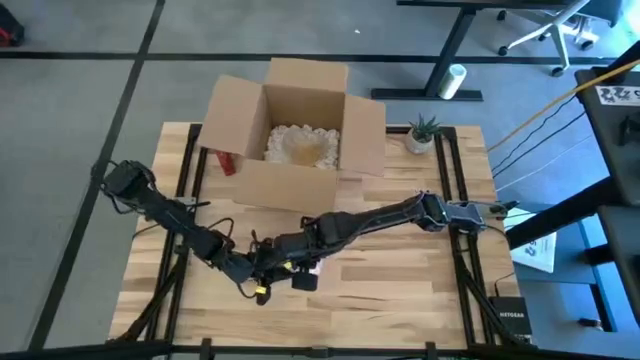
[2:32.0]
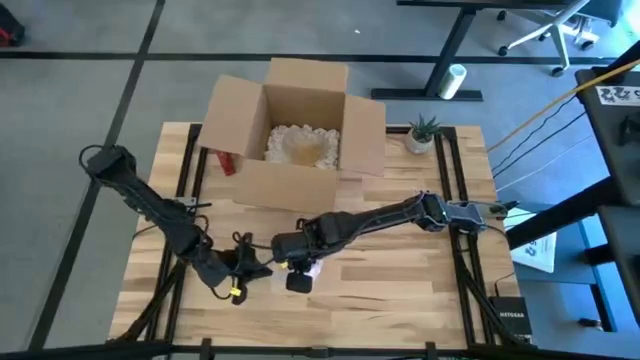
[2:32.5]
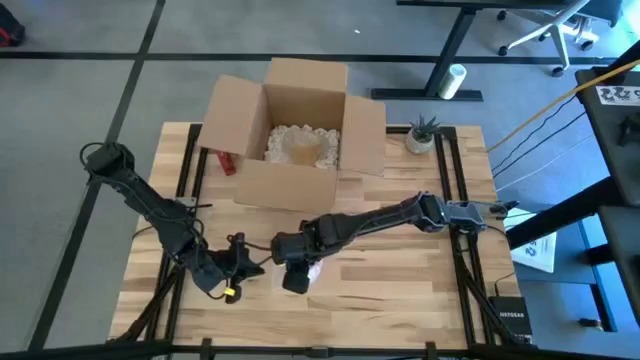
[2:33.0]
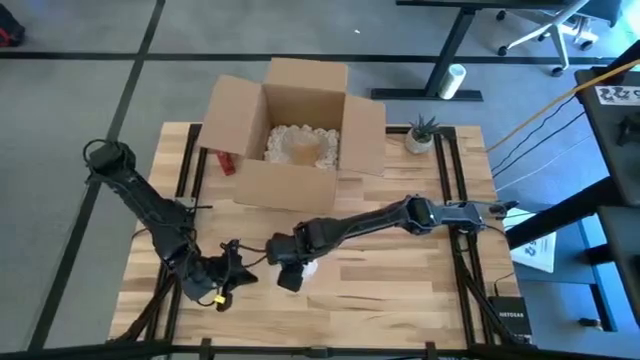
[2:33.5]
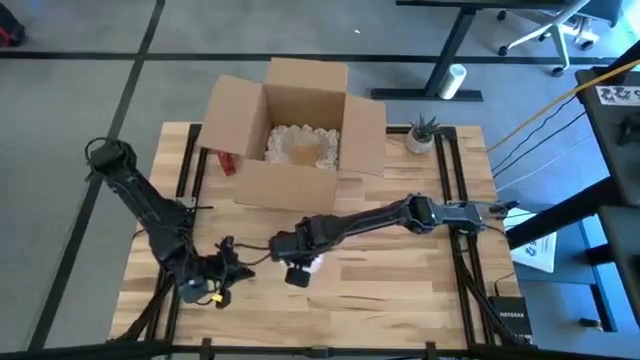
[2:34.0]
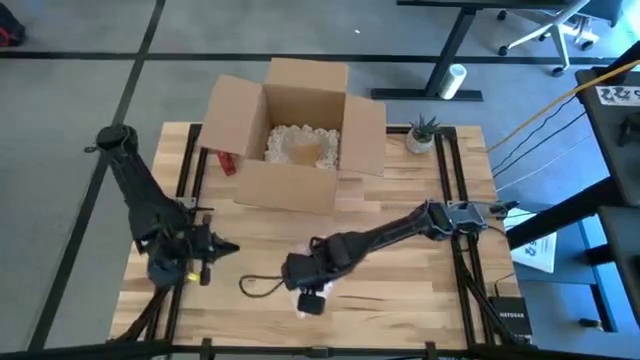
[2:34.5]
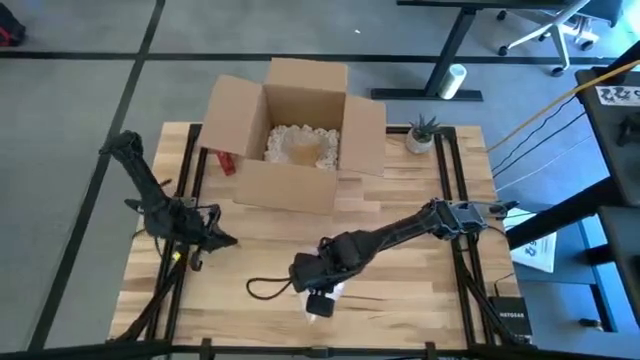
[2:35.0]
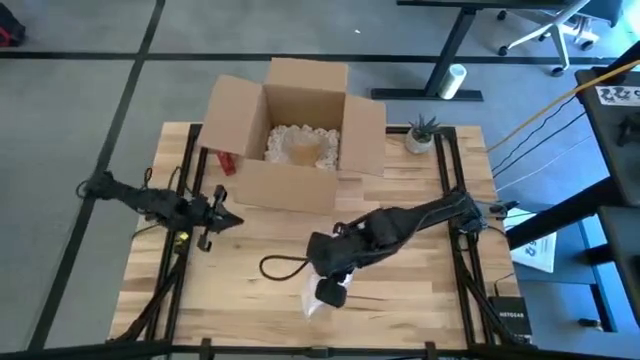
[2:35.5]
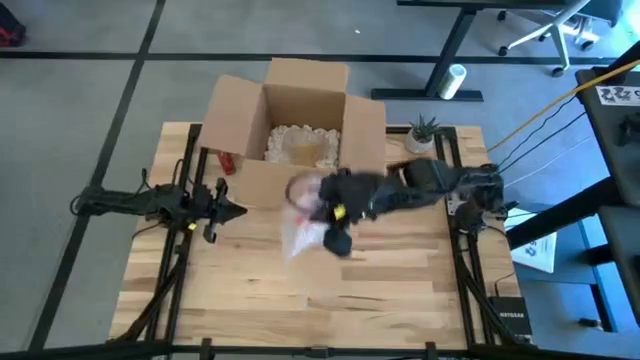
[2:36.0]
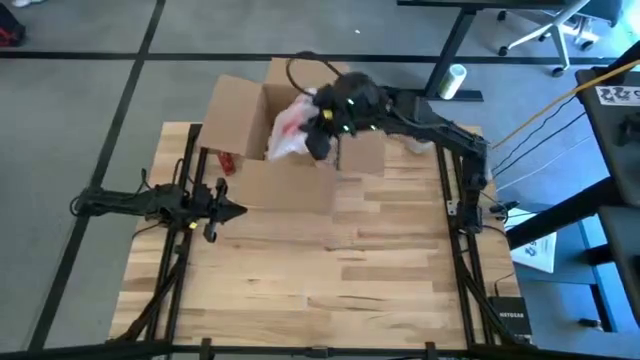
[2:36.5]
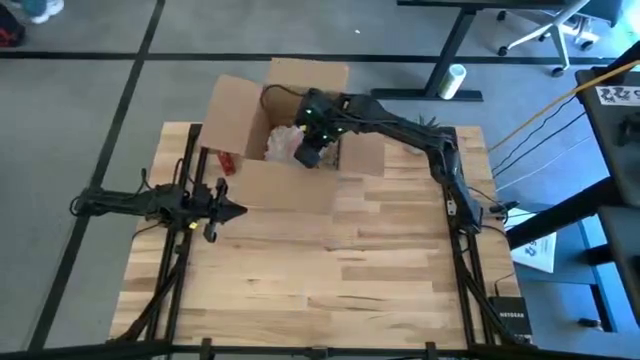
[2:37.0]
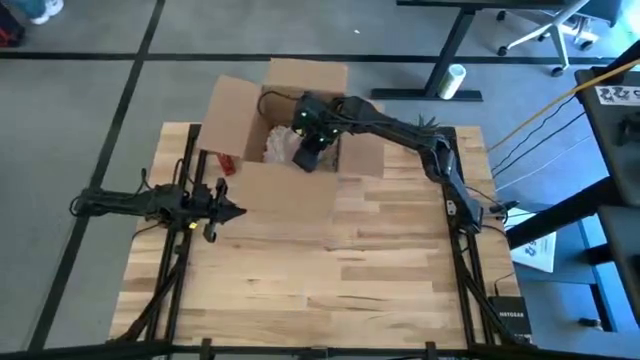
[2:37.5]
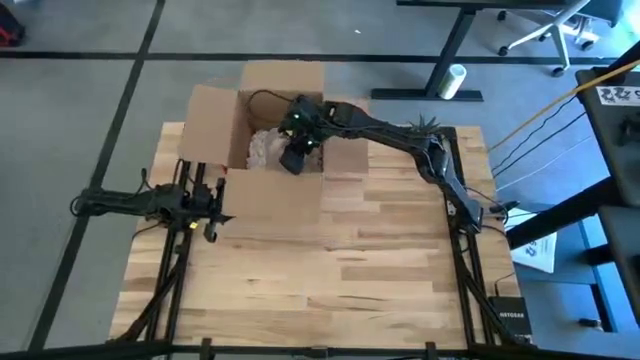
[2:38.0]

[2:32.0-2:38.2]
Task: wrap mug
Put the wrapped red mug into the cardboard box

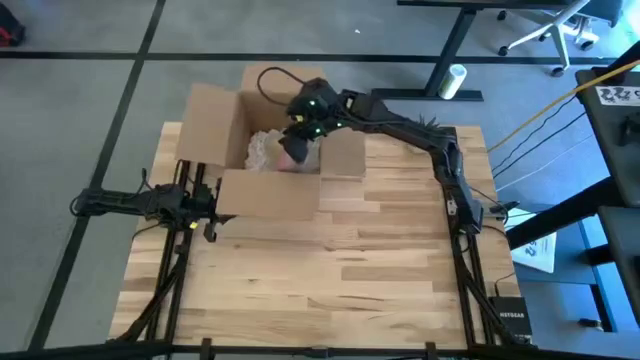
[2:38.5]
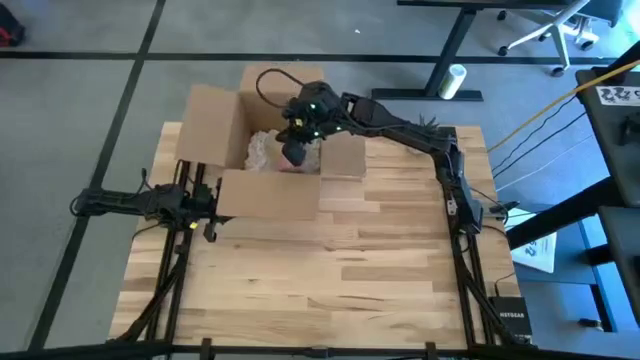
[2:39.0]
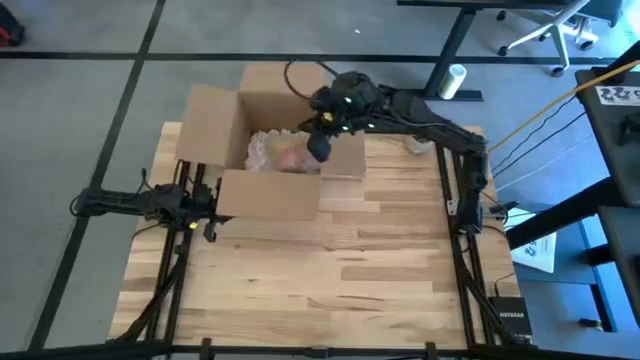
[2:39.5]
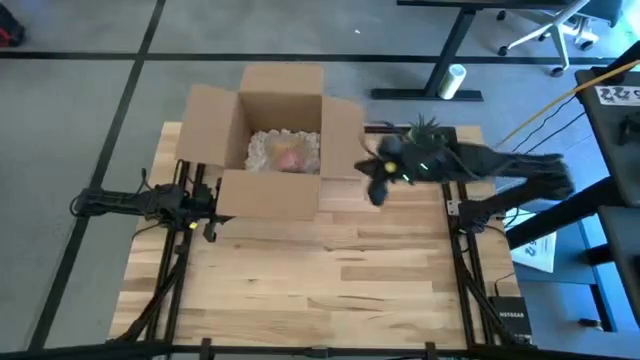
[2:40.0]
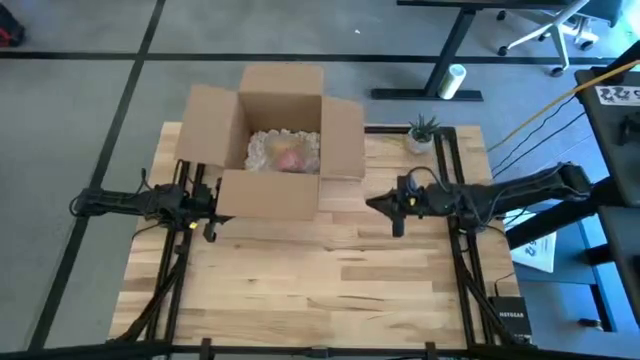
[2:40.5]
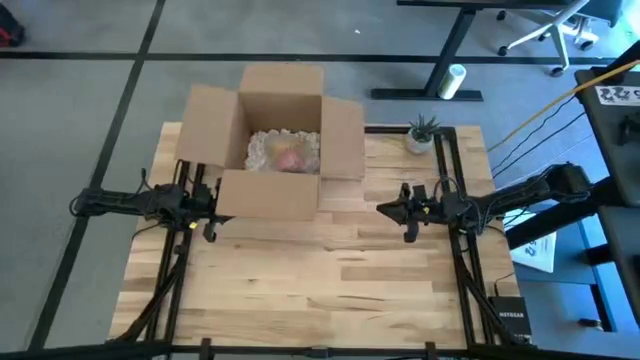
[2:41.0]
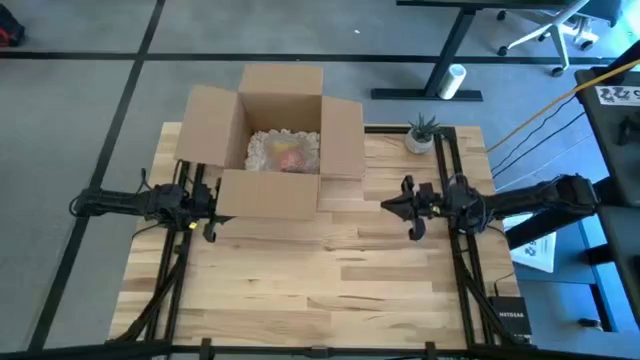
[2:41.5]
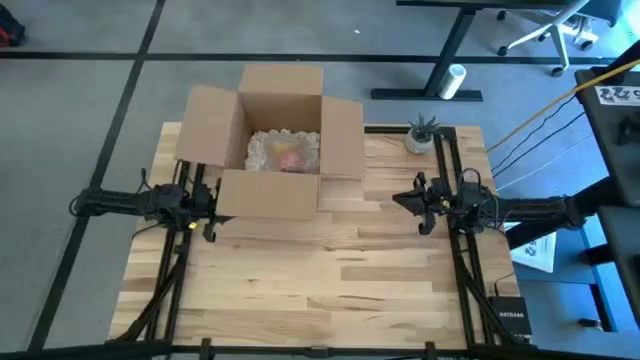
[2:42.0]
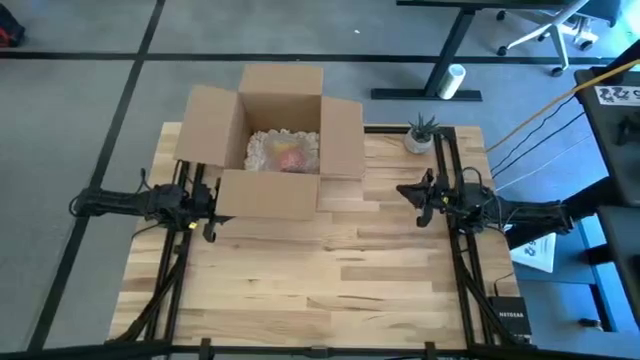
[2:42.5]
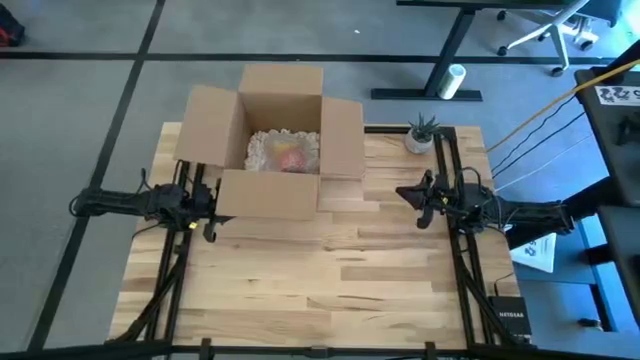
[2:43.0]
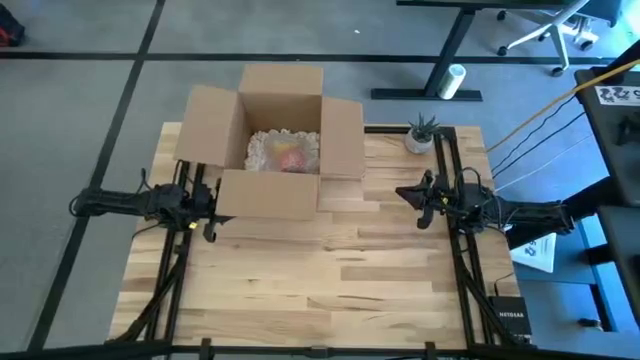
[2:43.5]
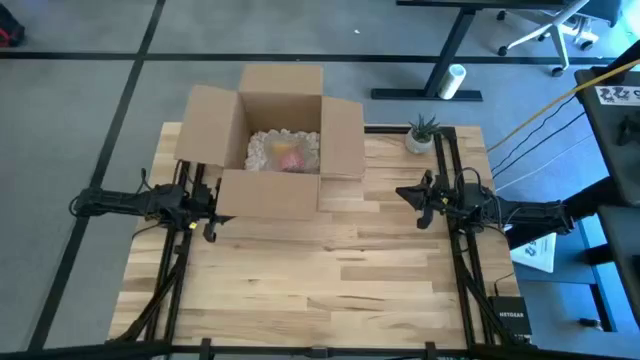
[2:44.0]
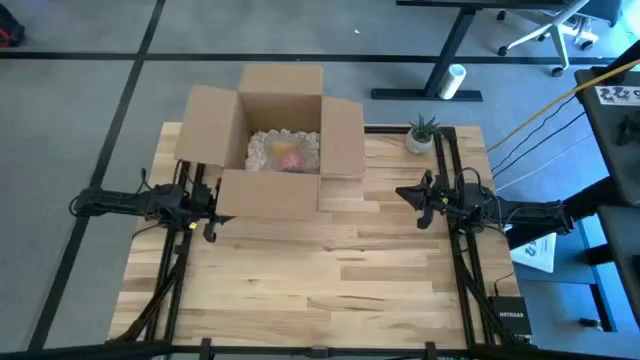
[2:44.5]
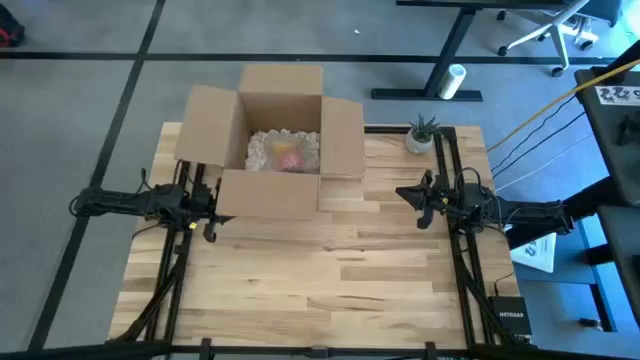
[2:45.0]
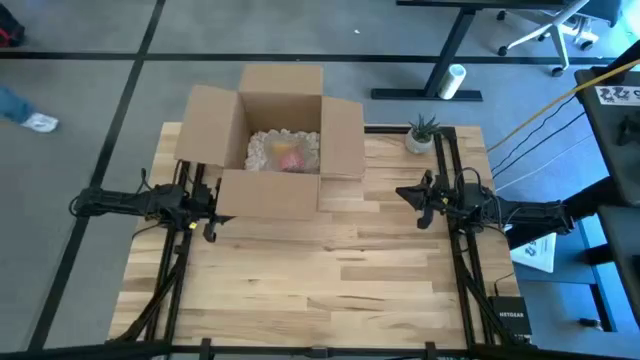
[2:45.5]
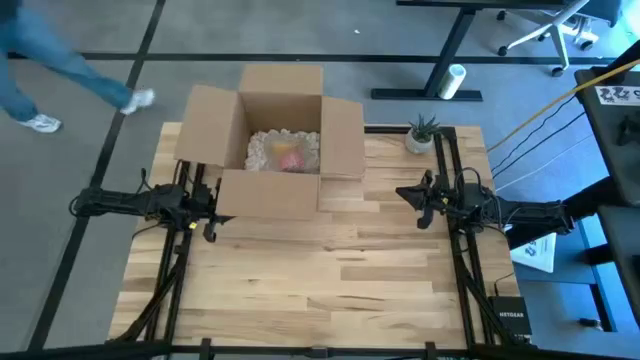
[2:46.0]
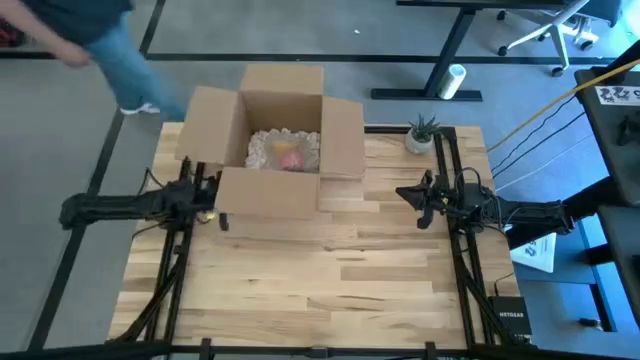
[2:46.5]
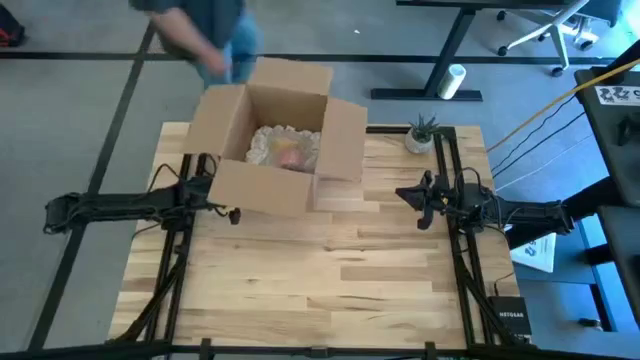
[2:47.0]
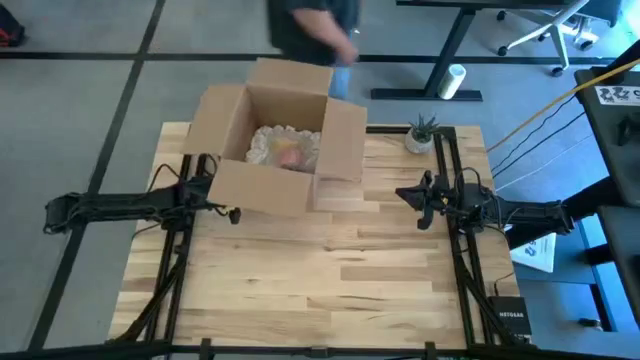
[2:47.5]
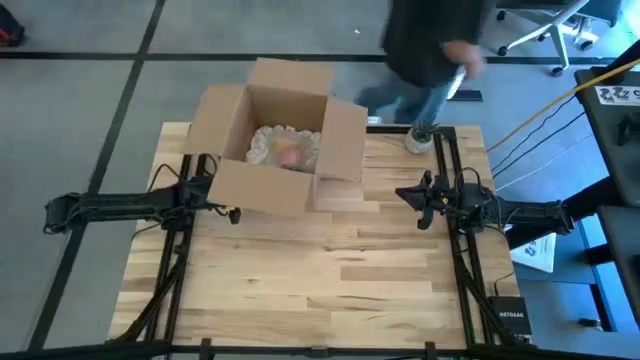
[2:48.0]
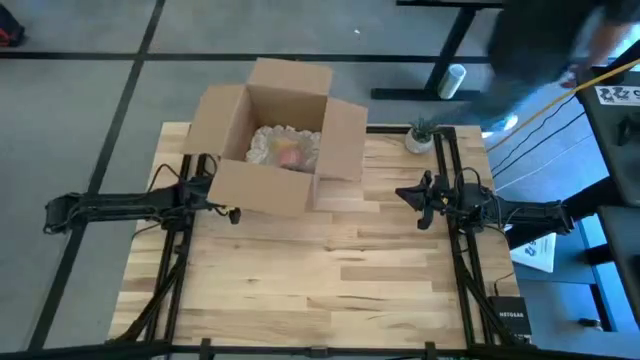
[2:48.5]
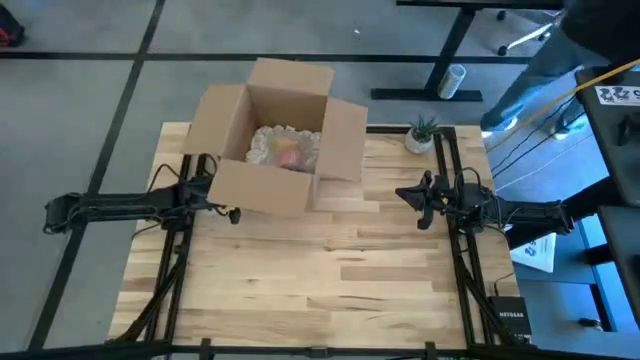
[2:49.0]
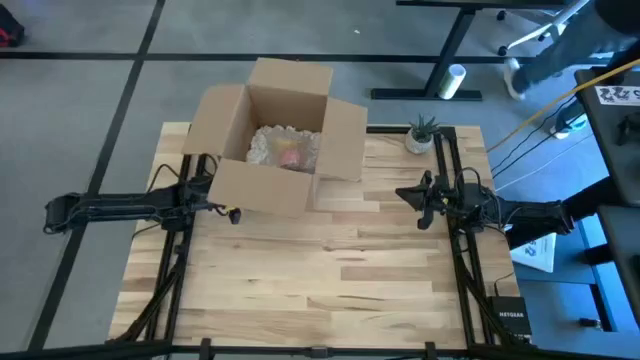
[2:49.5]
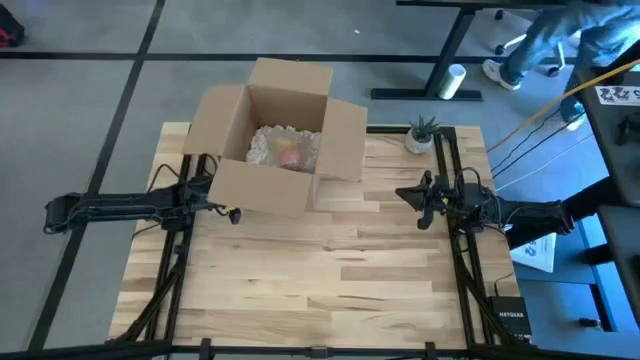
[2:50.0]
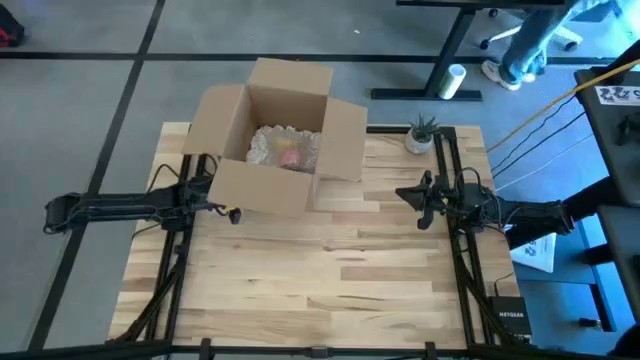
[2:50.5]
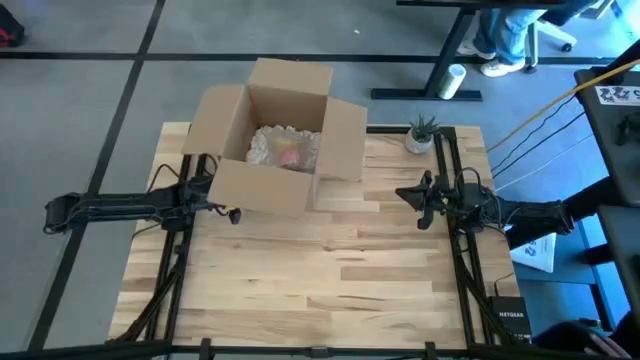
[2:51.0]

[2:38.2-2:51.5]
Return to Home Position
